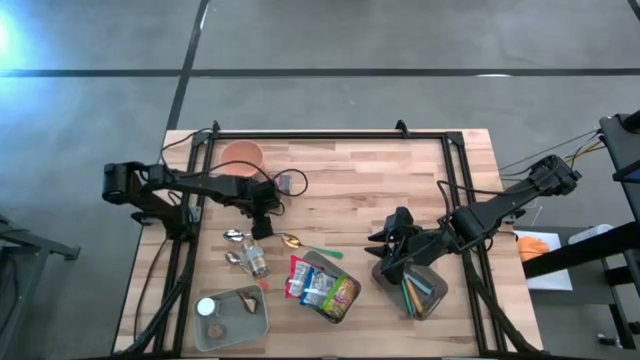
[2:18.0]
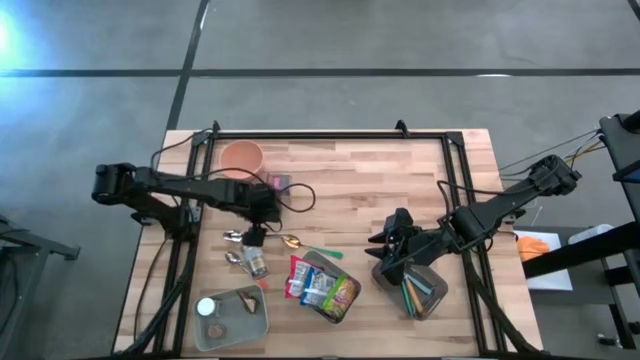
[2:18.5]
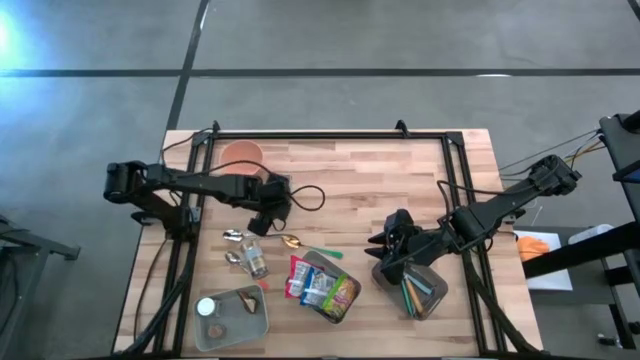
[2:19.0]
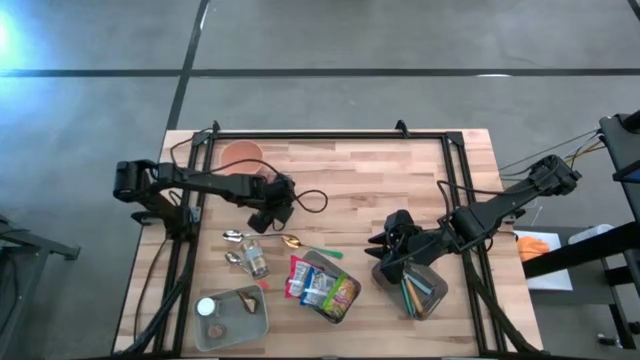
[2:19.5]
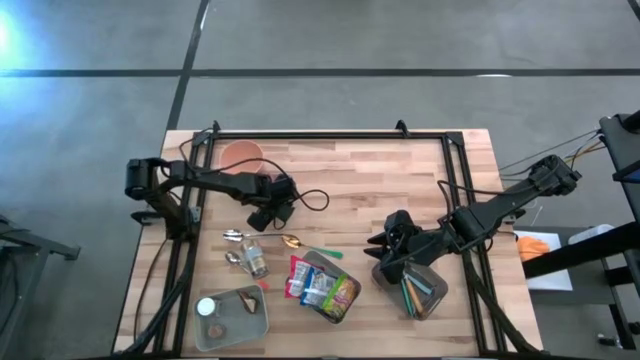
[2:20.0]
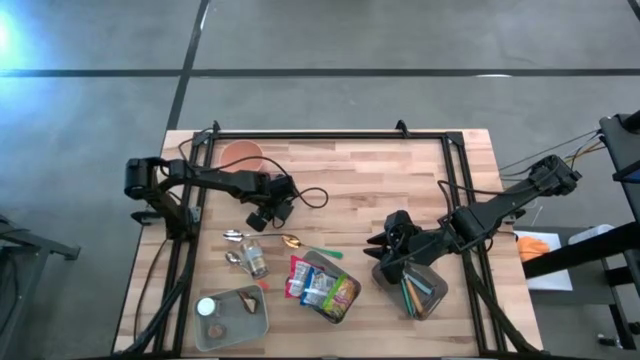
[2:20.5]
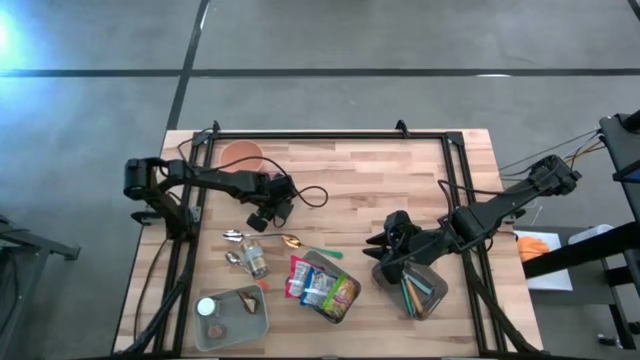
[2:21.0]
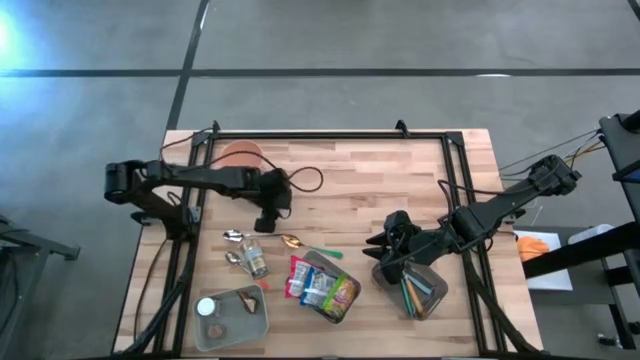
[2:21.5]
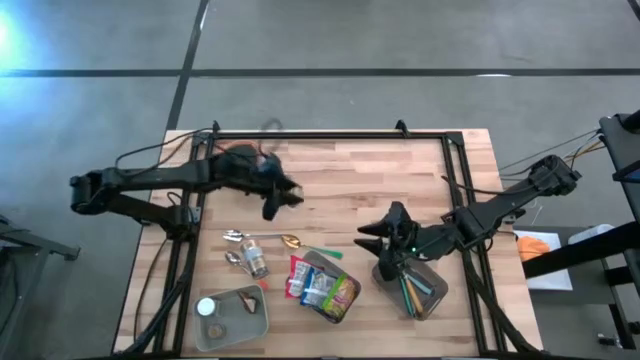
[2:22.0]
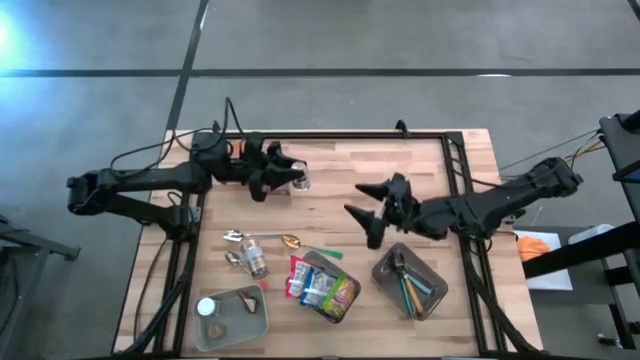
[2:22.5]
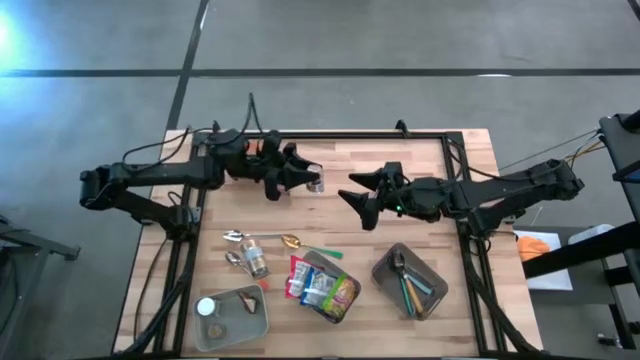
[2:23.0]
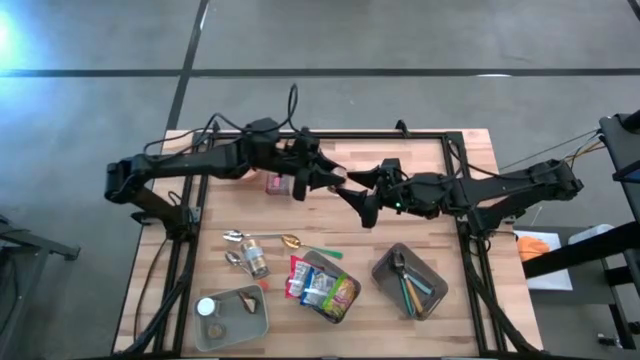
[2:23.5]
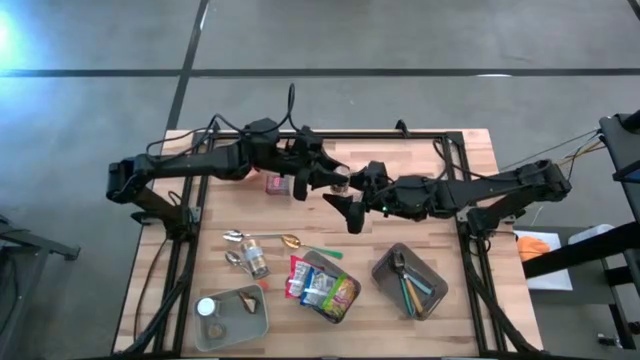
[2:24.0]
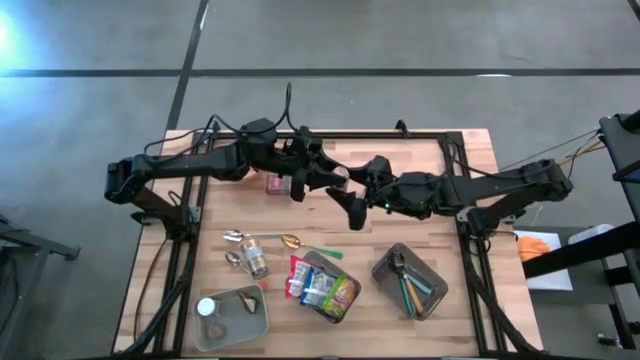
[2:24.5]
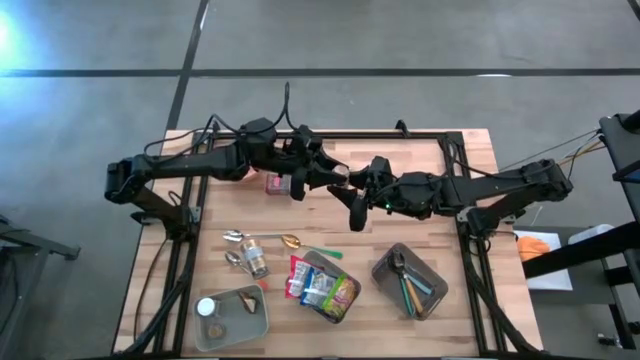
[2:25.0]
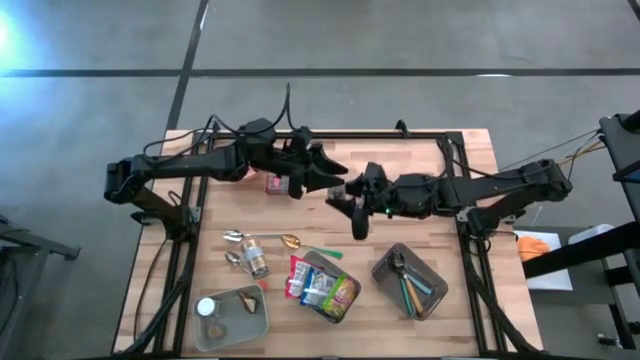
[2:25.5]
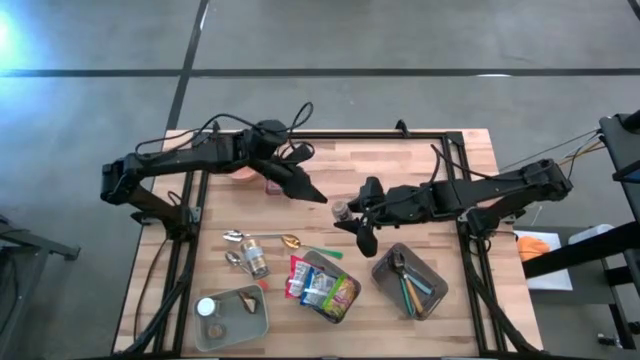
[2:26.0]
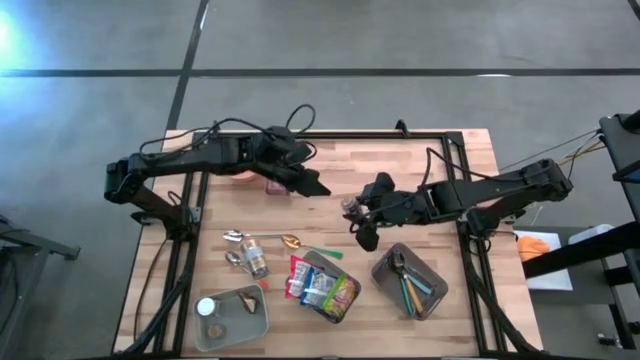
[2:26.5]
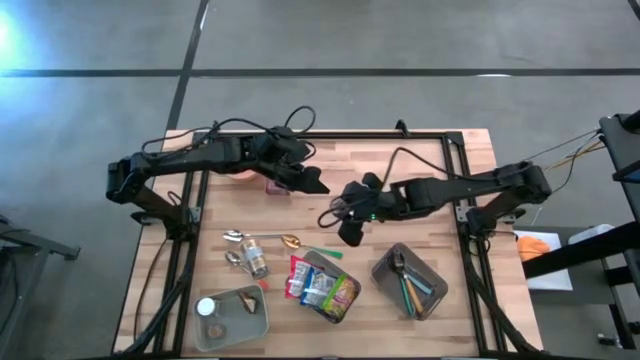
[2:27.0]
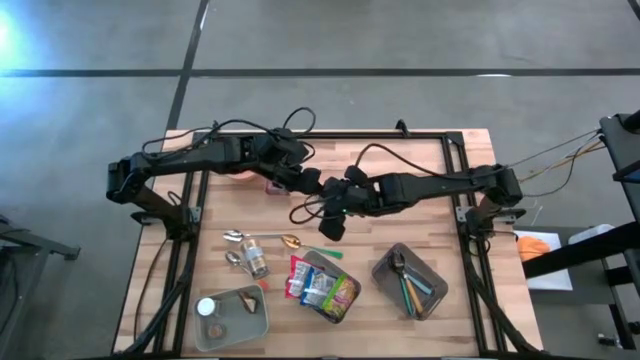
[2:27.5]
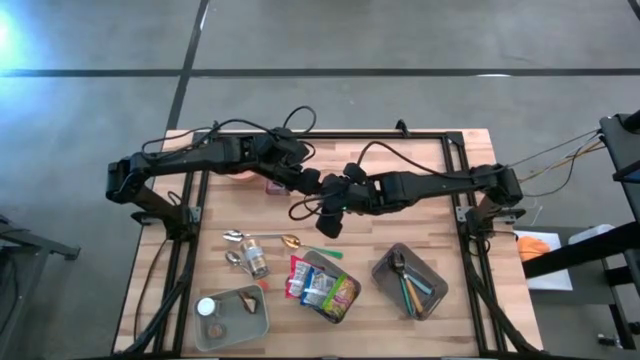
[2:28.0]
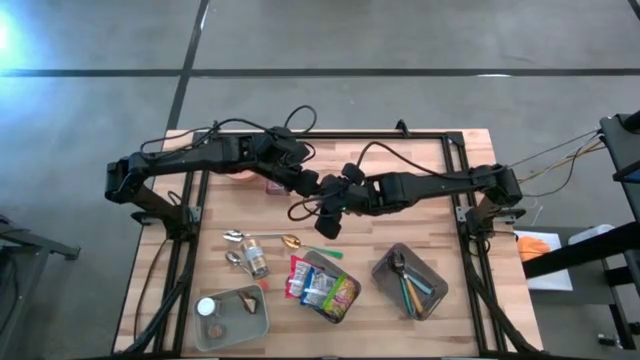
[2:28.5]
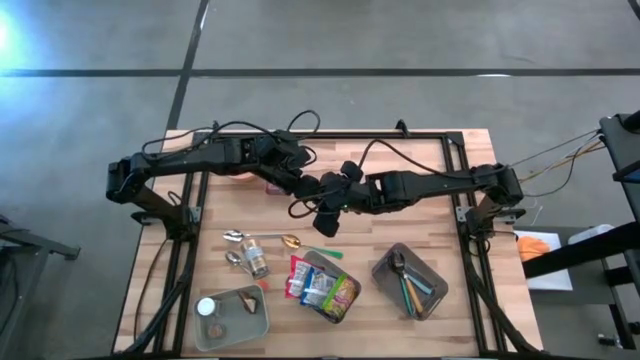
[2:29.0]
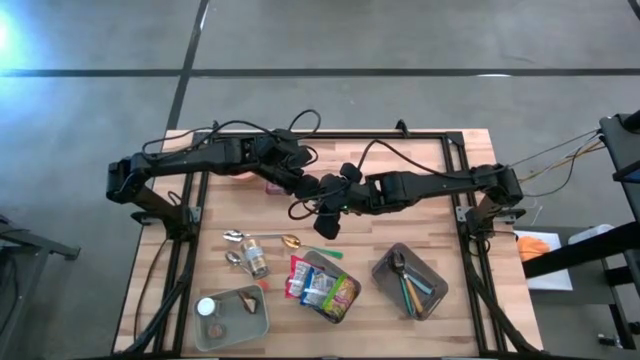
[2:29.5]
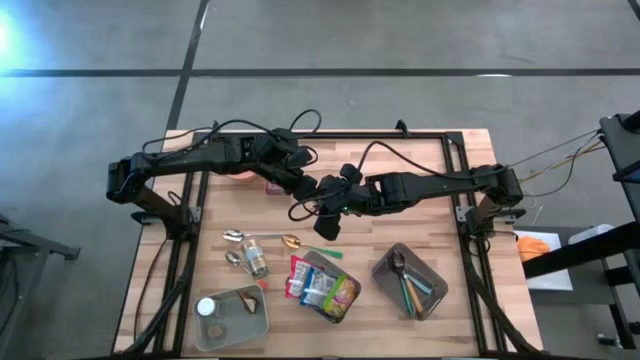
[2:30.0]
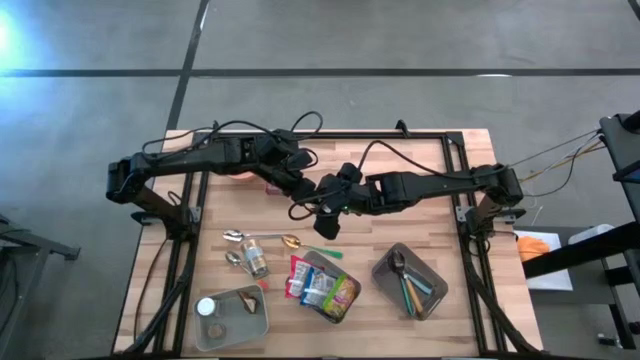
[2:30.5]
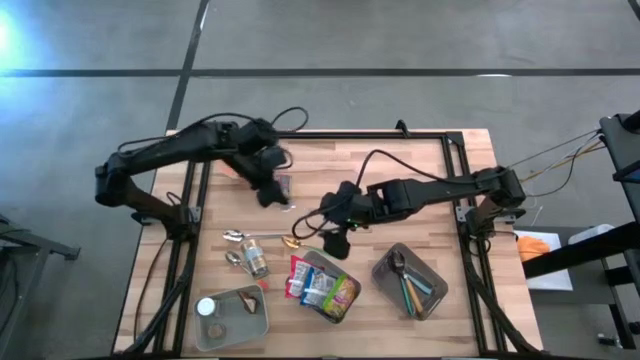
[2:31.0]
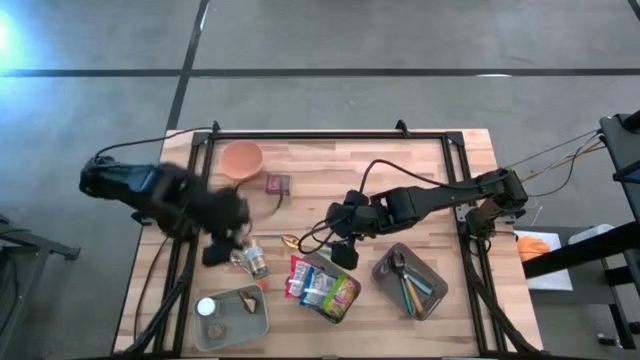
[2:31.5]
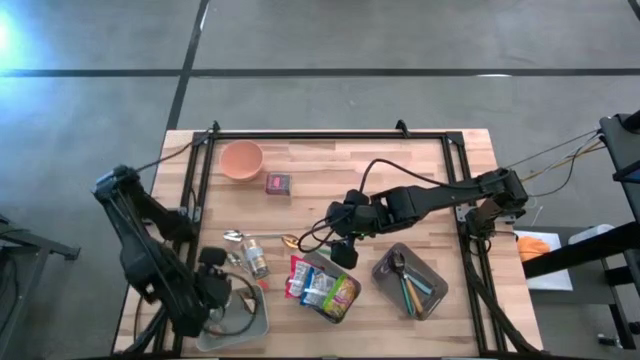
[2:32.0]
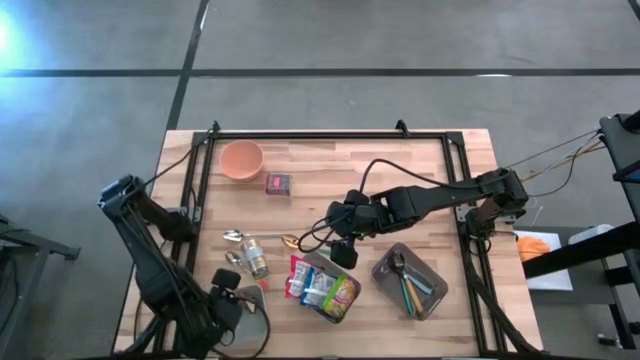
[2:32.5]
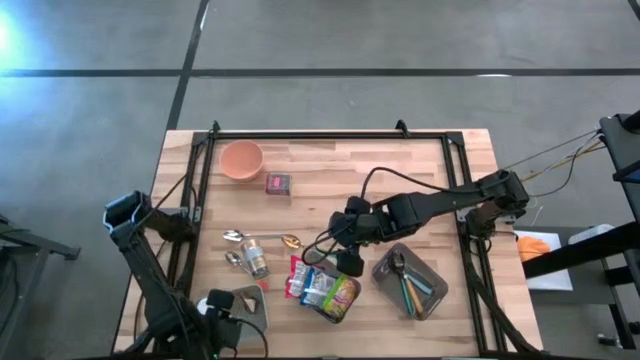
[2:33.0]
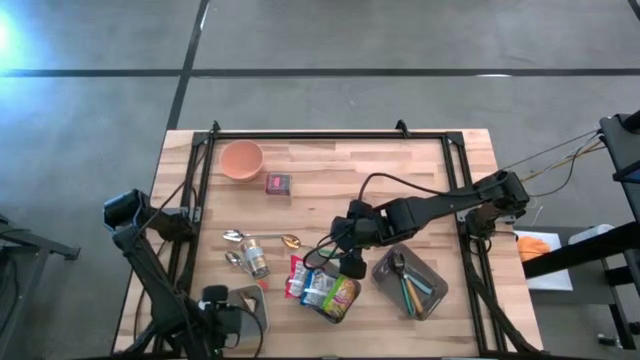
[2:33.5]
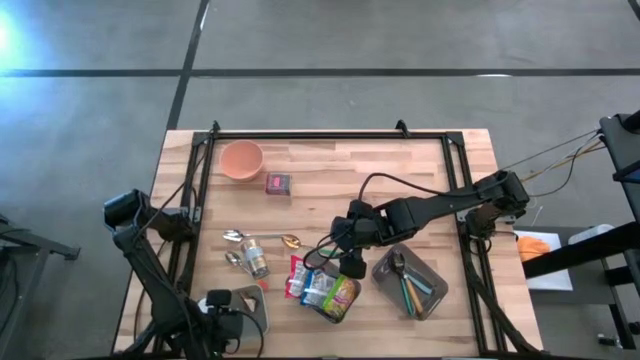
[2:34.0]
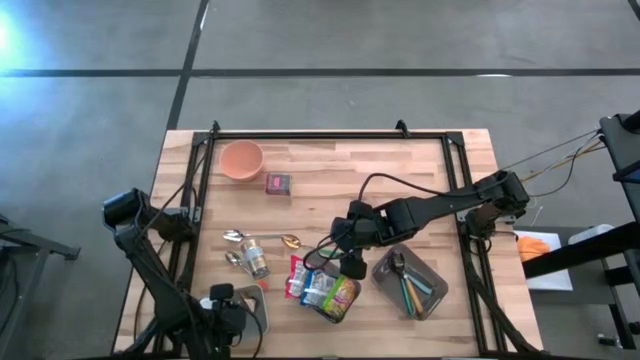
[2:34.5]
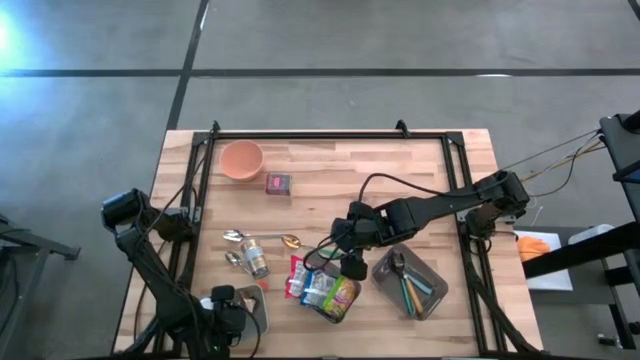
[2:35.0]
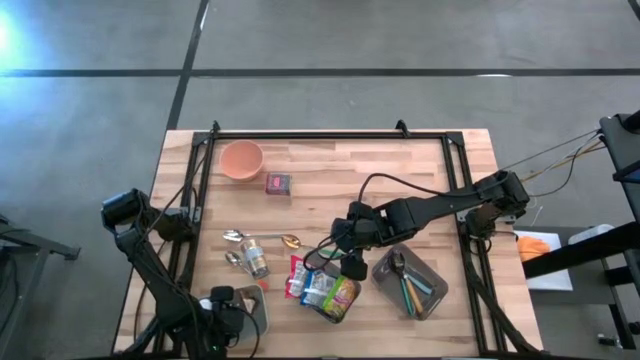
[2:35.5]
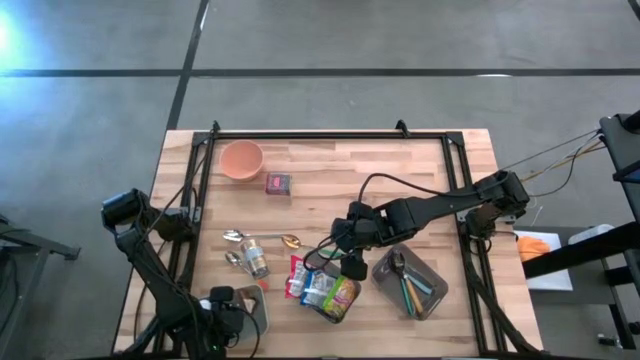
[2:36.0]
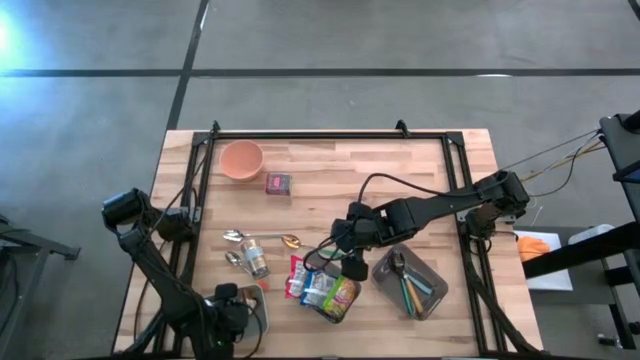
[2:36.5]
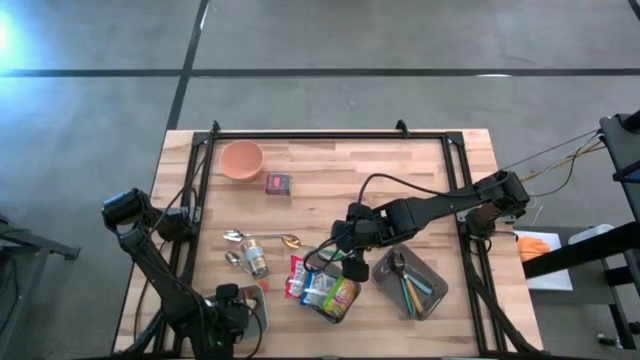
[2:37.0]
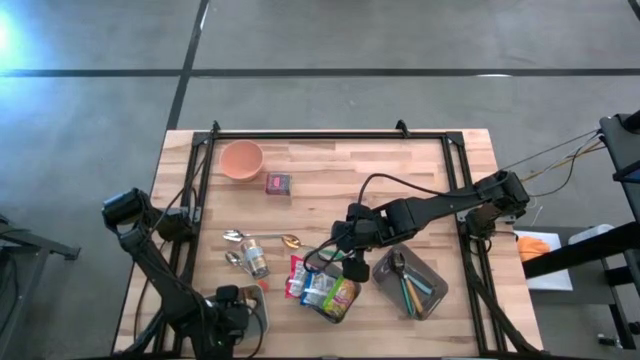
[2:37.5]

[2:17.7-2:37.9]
Put the brown seasoning bottle into the left gray bin
